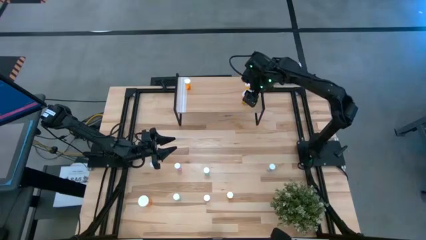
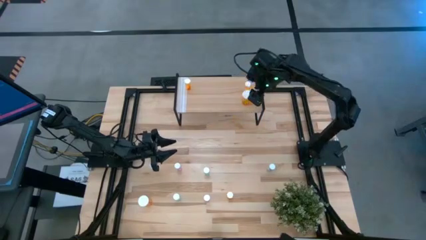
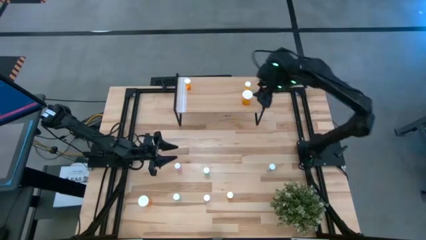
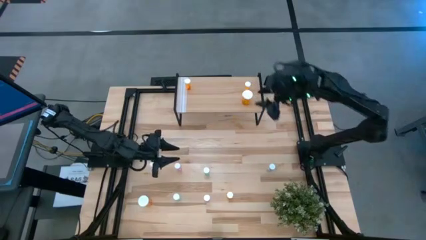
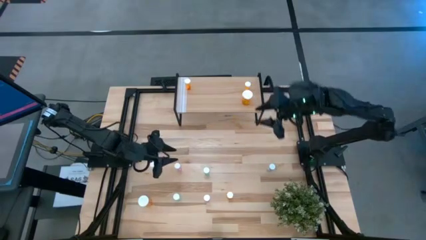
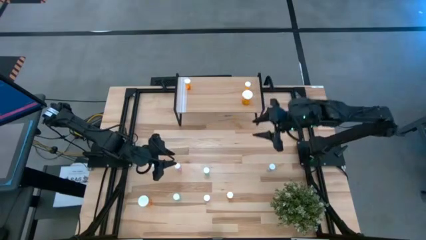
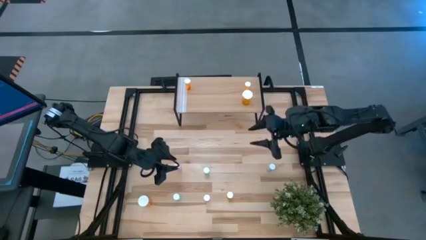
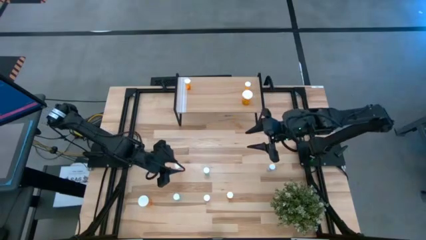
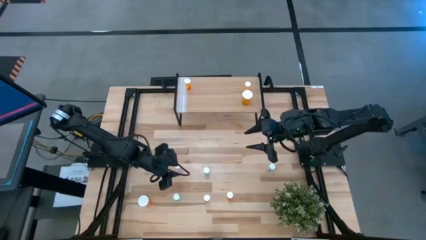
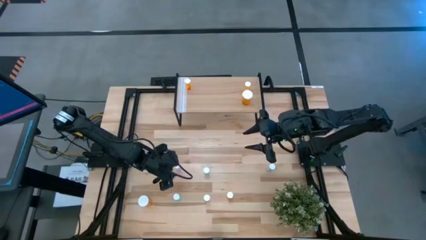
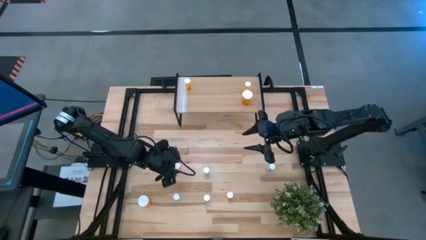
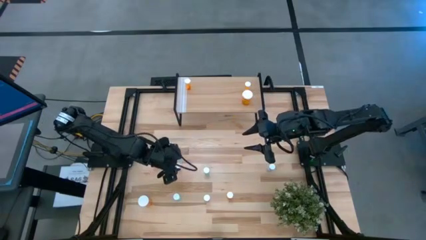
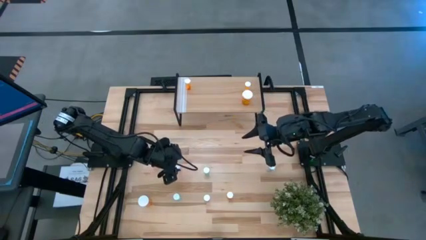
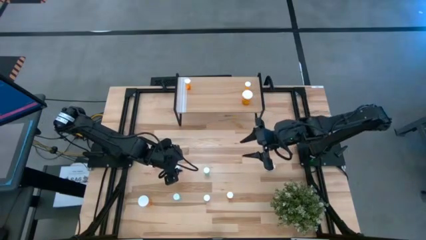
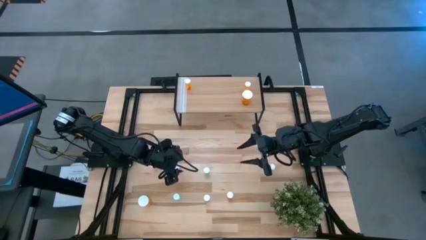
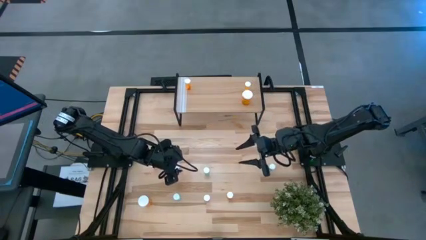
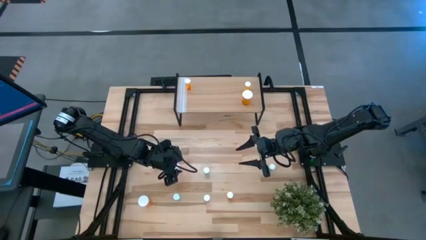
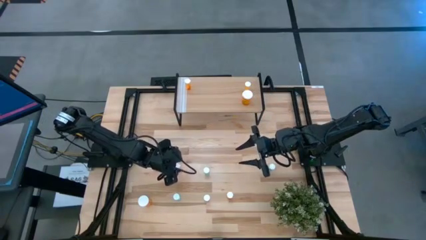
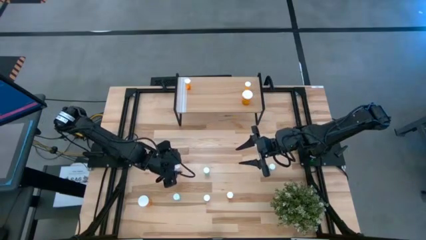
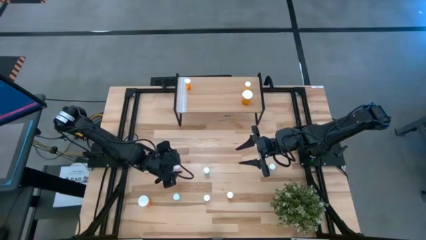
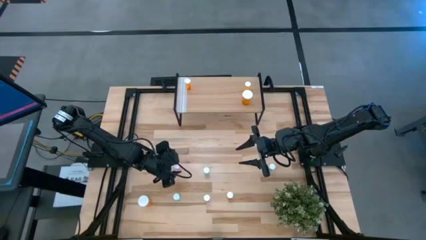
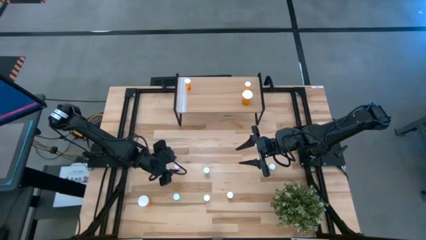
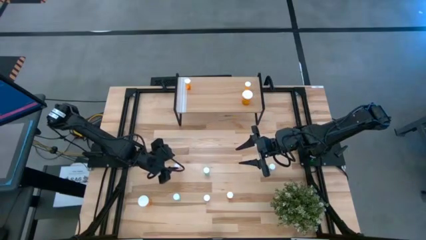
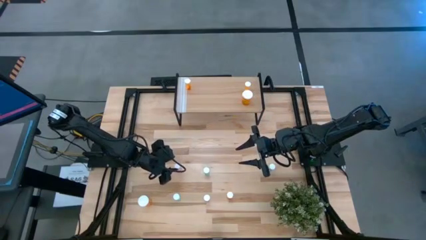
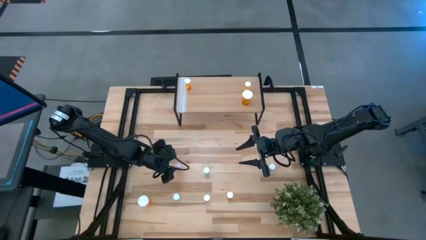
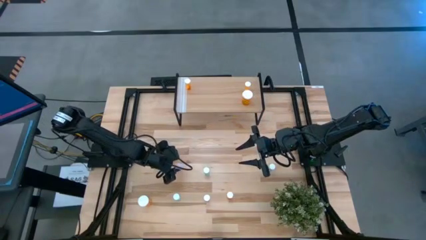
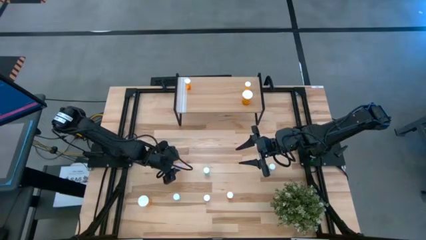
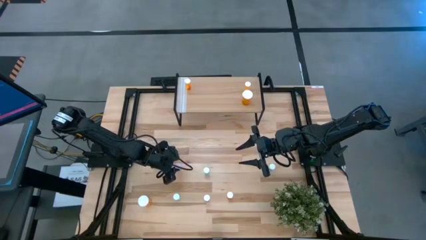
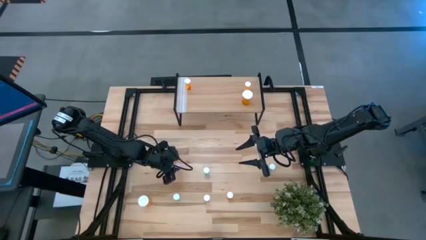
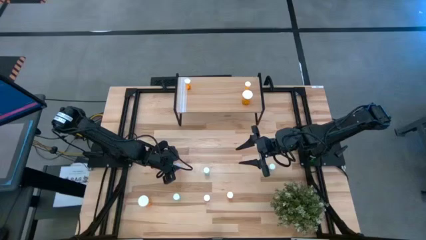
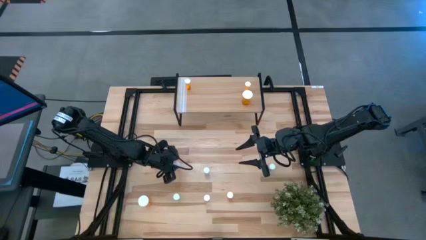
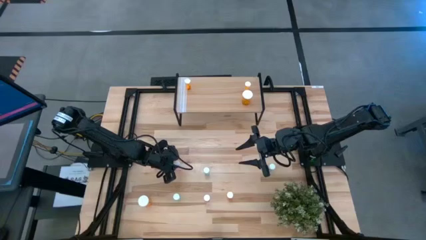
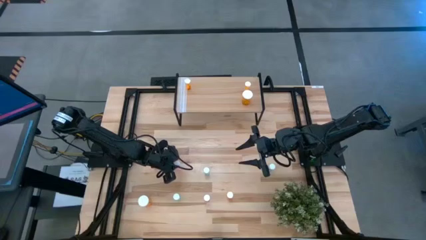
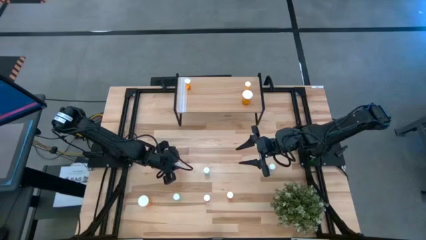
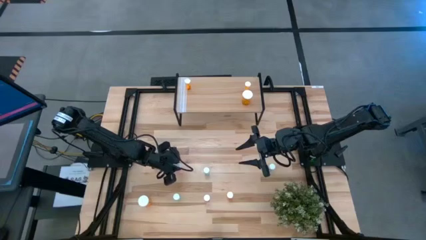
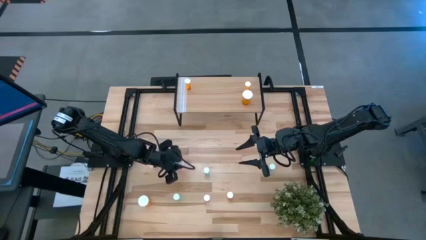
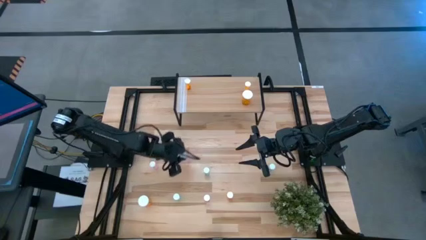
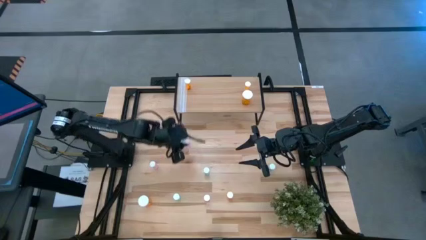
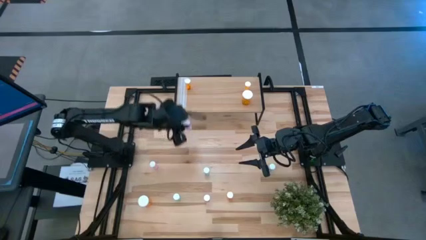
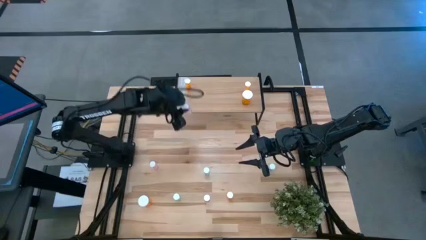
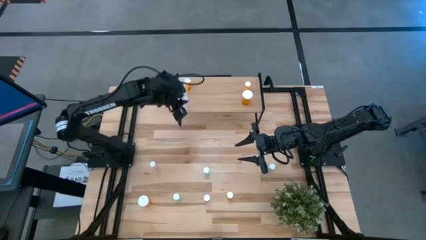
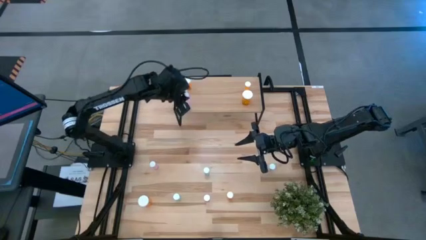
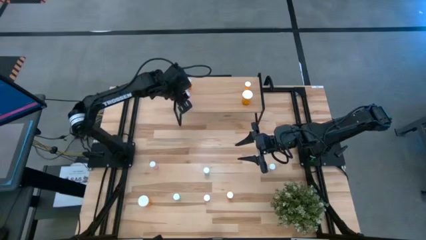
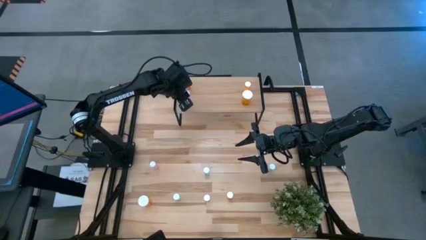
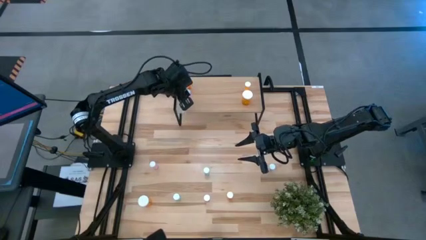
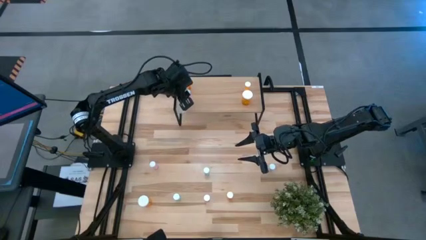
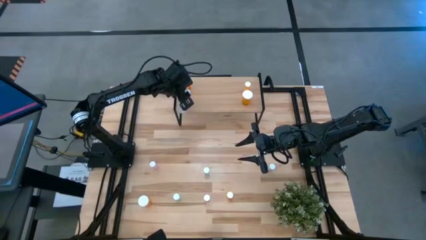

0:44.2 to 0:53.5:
Task: Pick and place medicine bottles onto shelf by color
Put the top right pink pill bottle on the shelf

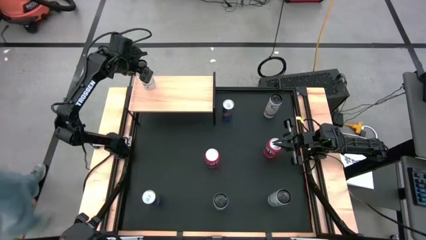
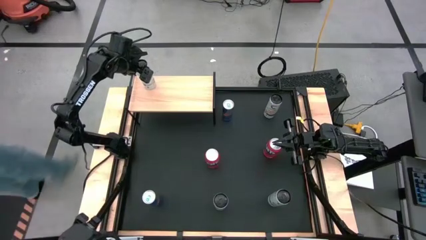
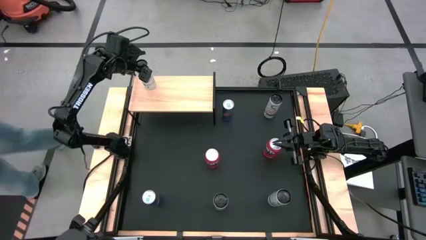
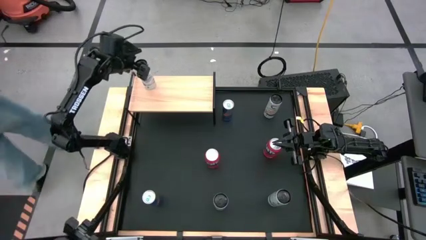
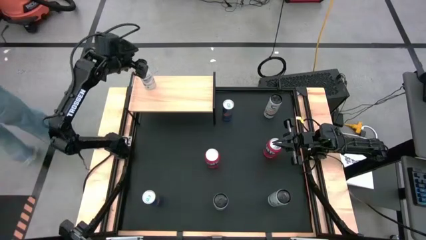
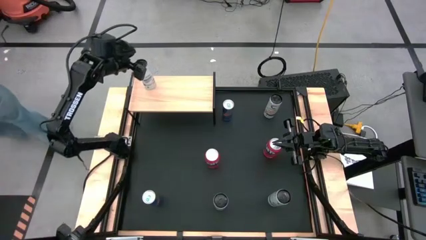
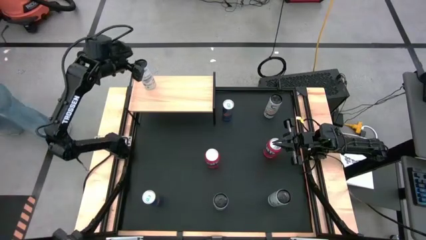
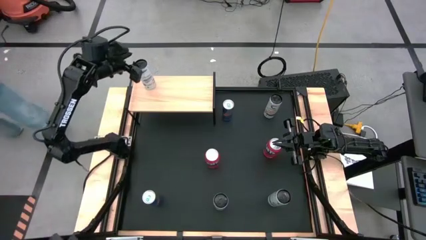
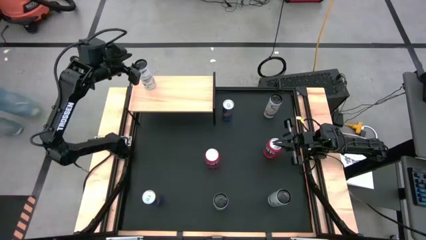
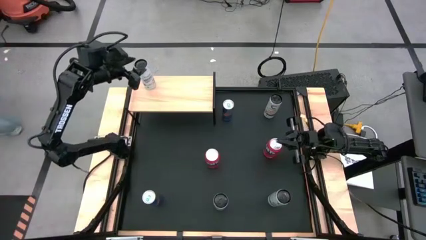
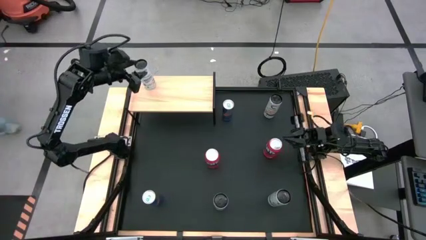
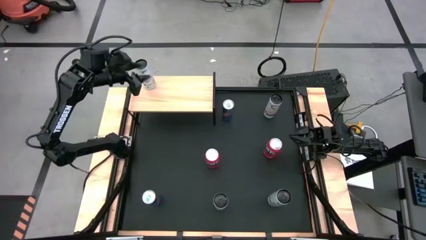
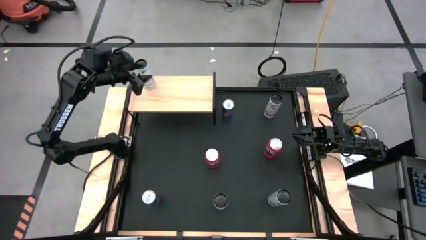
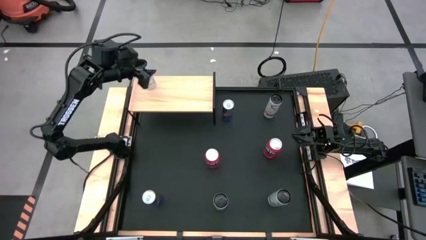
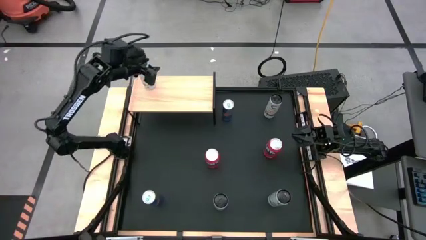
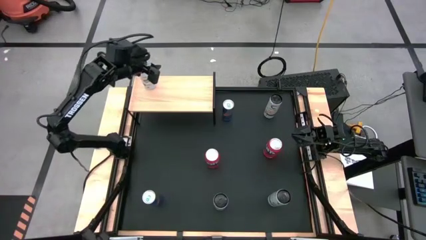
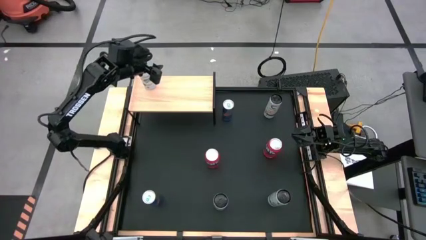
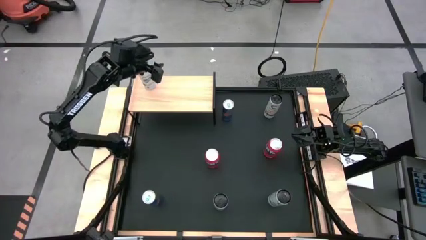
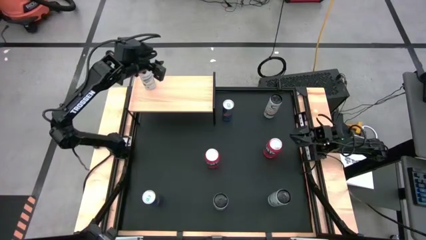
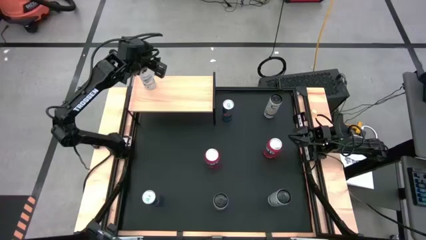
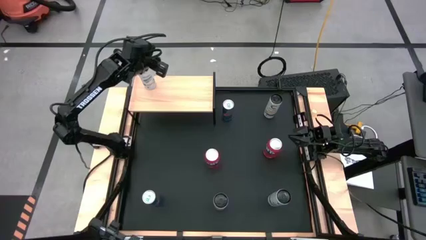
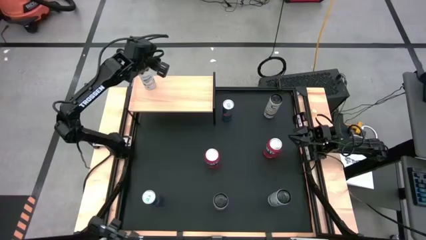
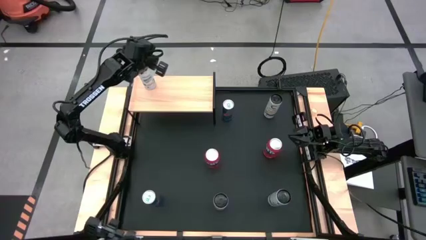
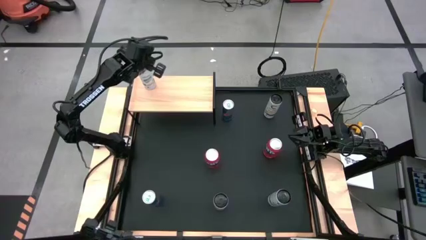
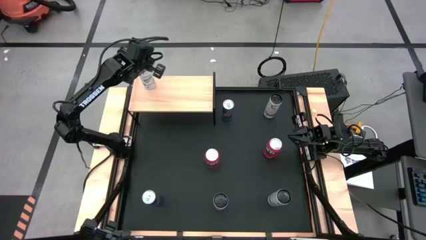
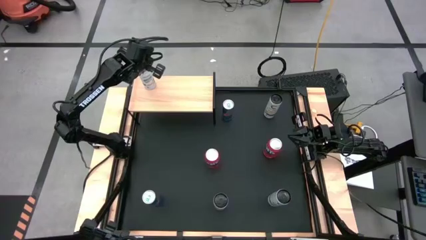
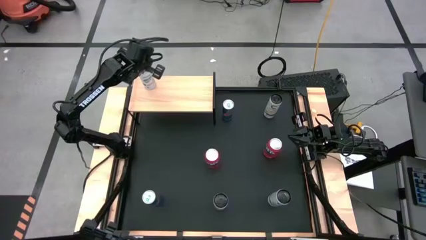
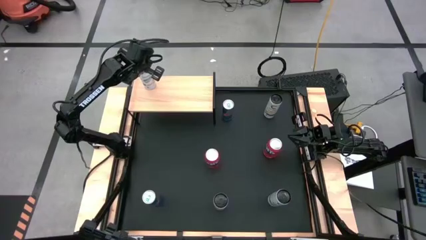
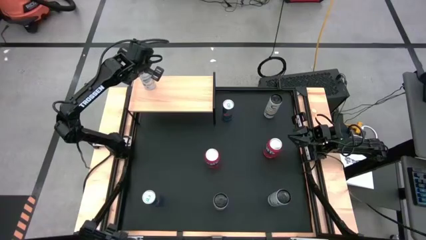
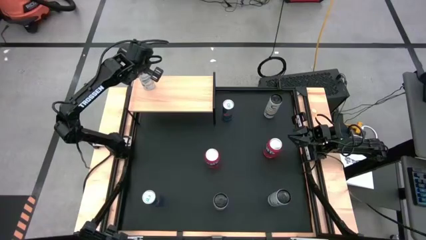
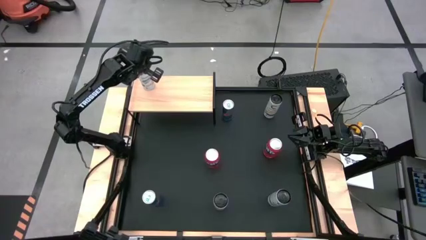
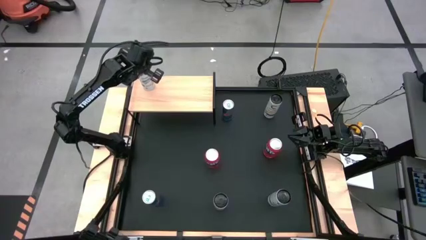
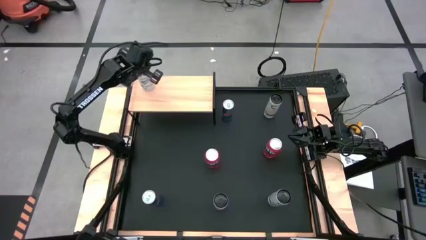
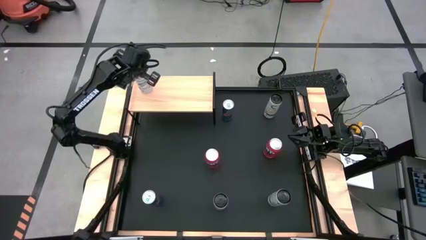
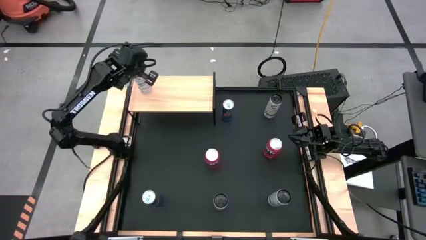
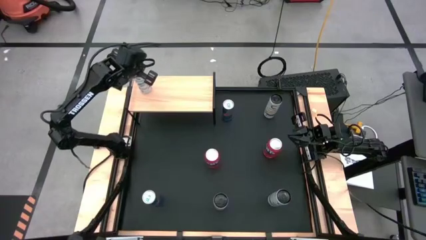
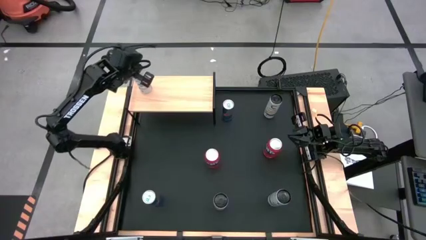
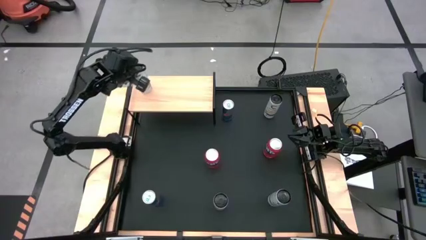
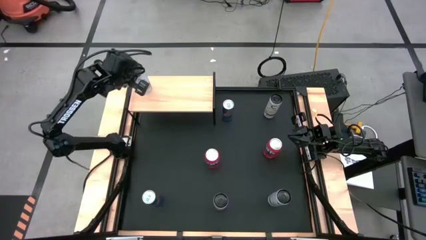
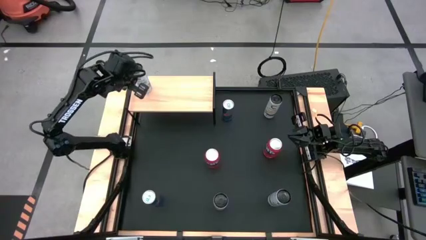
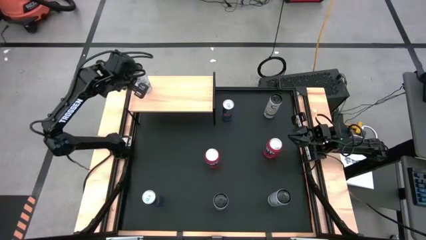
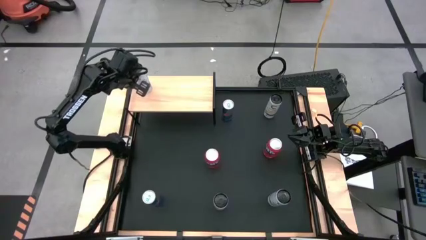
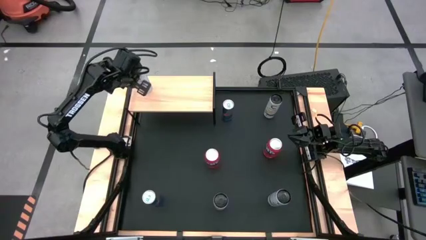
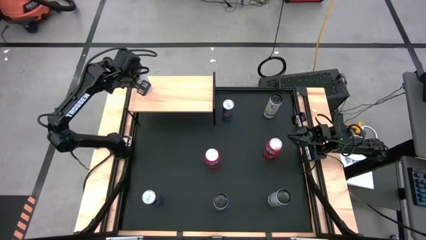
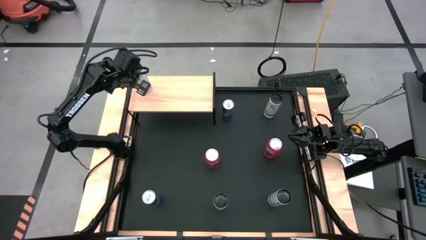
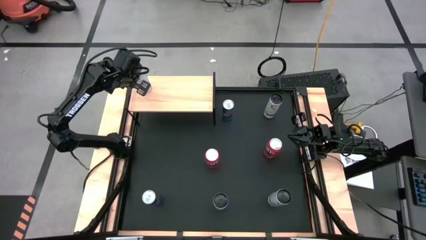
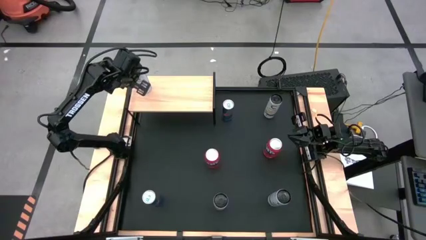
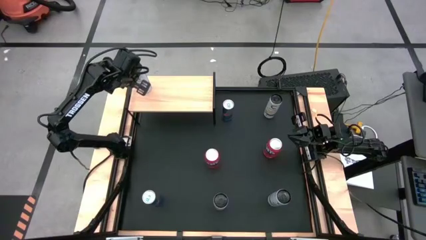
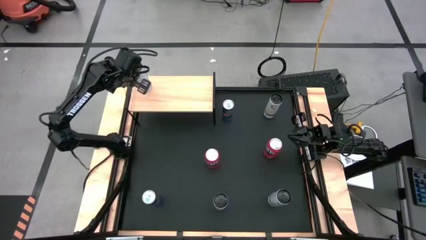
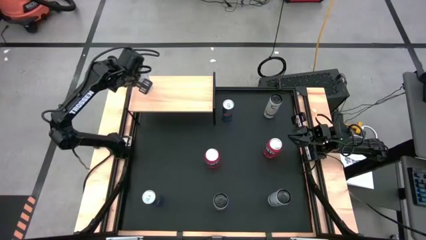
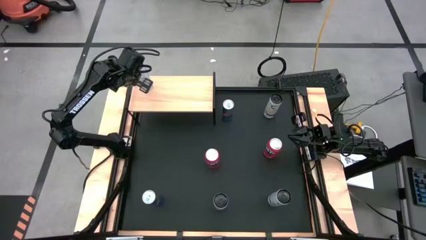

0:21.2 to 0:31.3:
Task: Place canned beverage on shelf
Put the left white-blue soda can on the shelf
